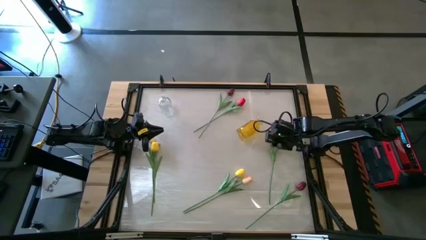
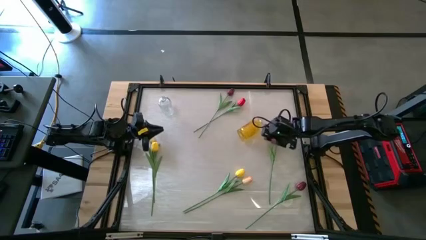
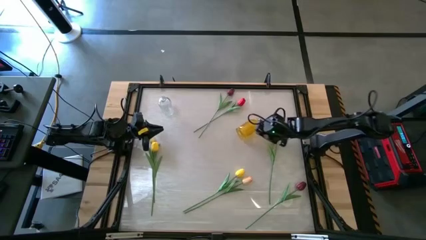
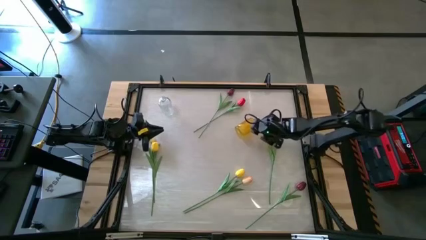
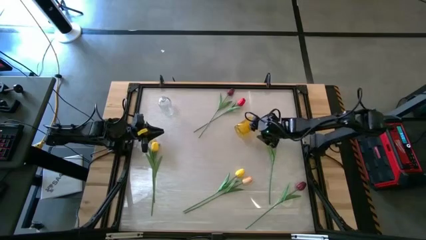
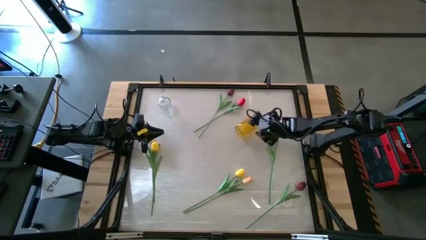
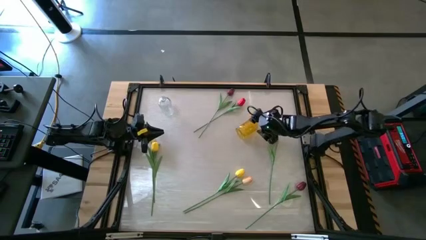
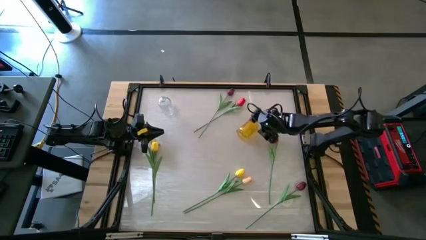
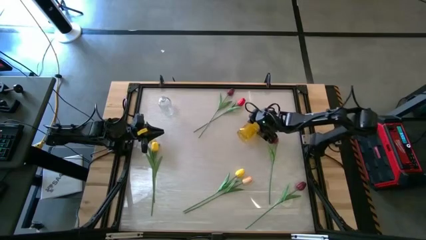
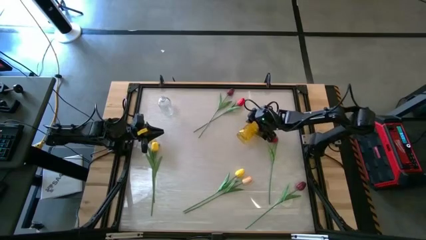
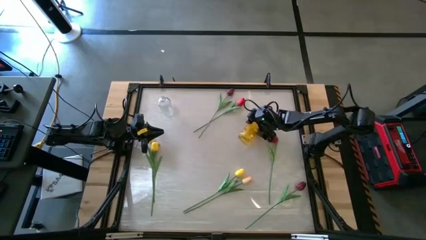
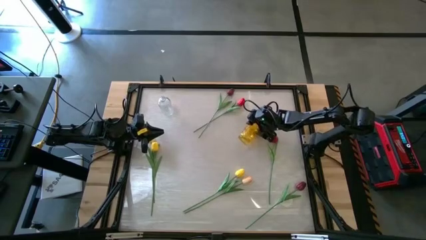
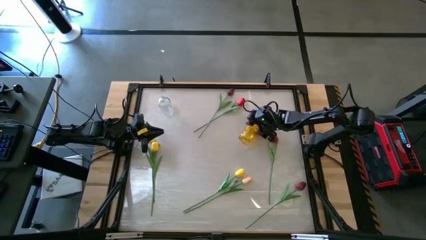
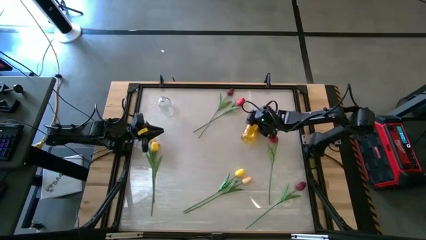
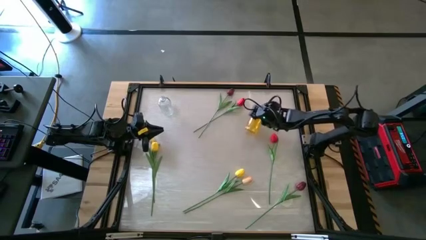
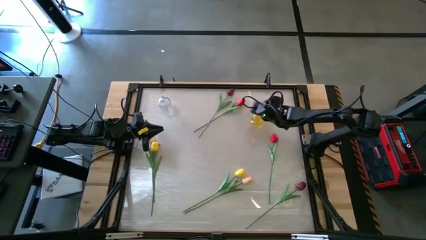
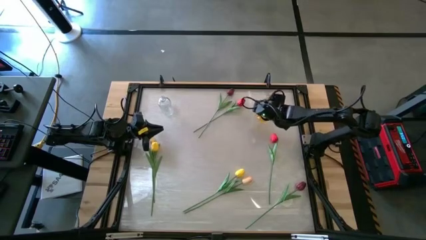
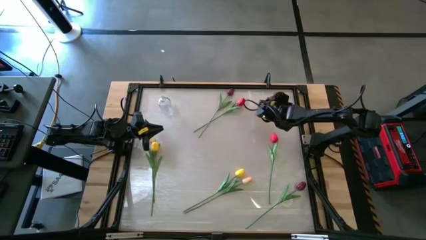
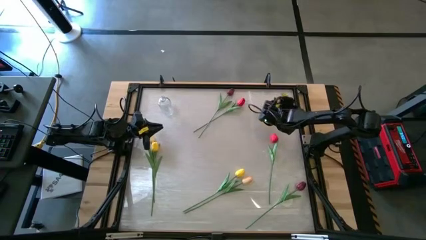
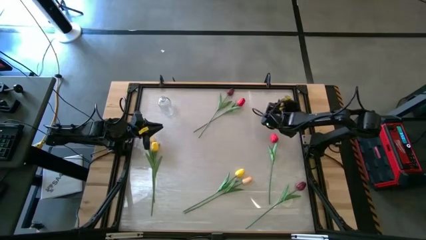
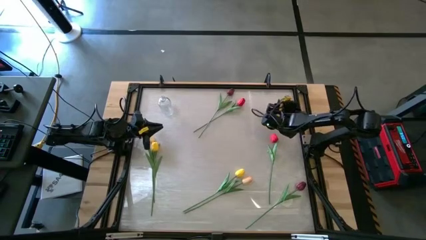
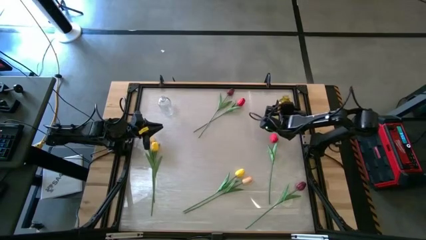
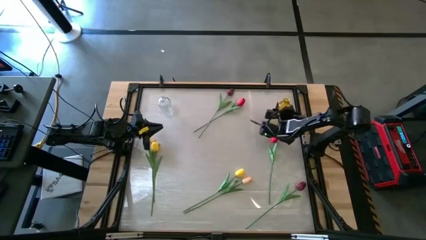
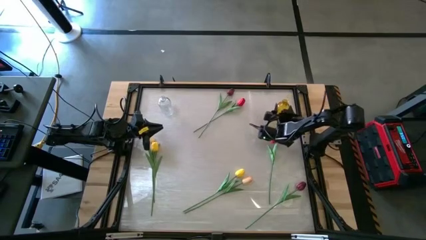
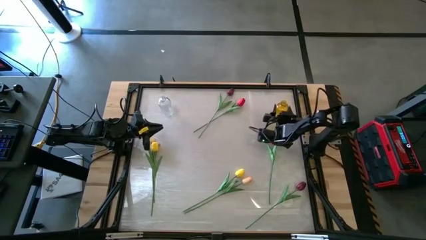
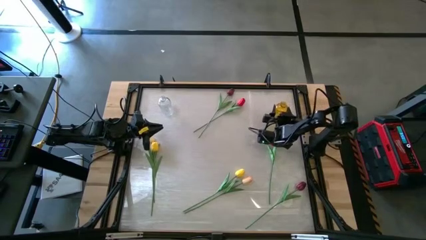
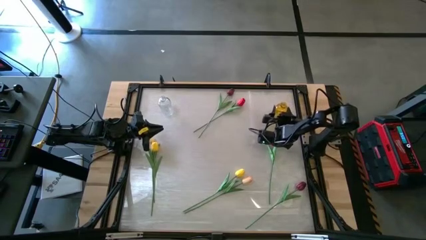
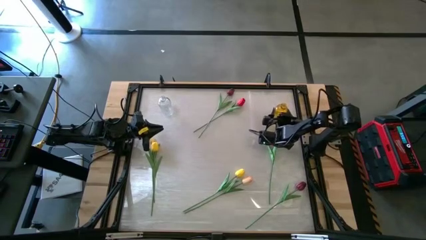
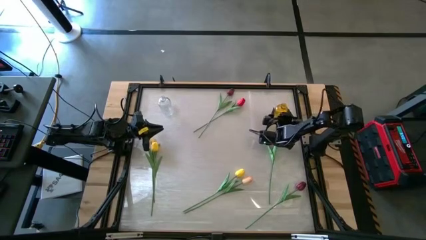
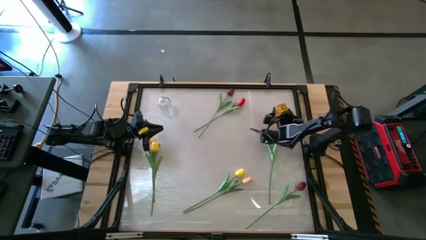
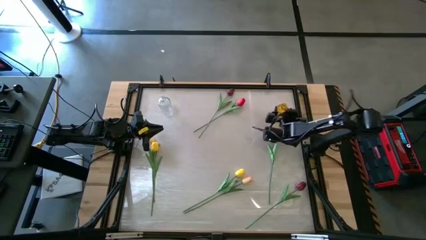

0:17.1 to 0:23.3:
Task: Sort flowers into vase by color
Adjust the yellow vase on the table

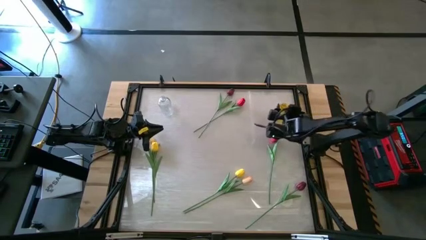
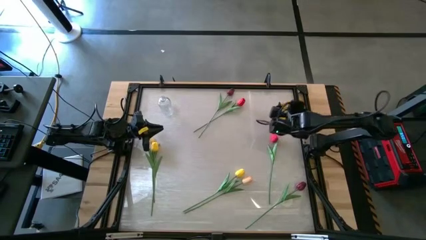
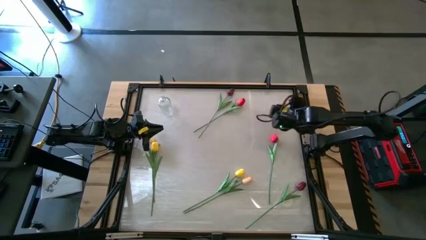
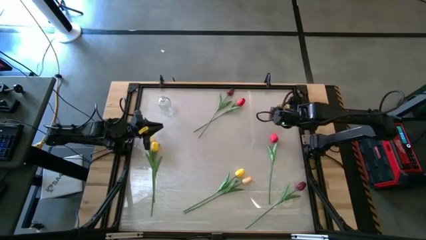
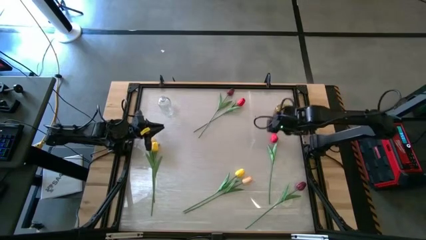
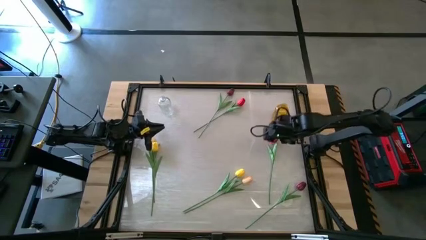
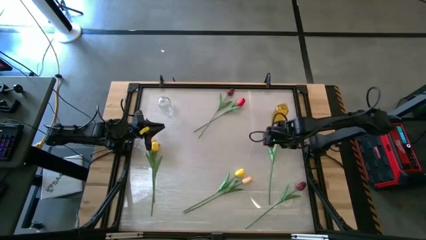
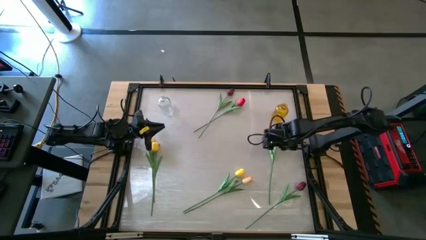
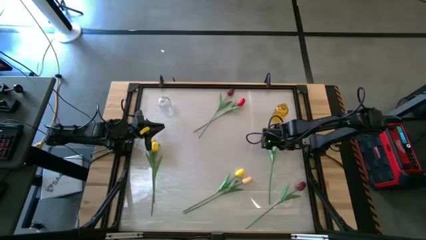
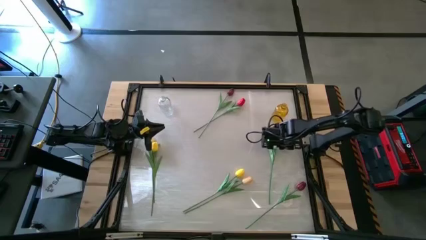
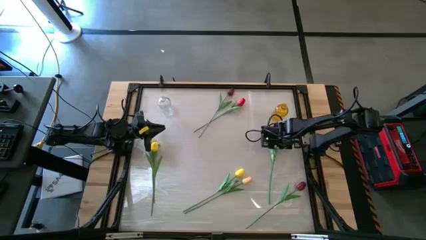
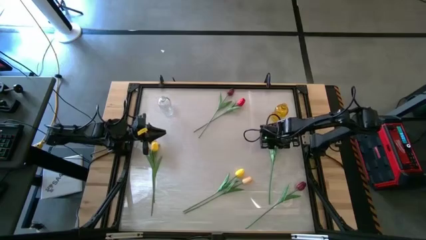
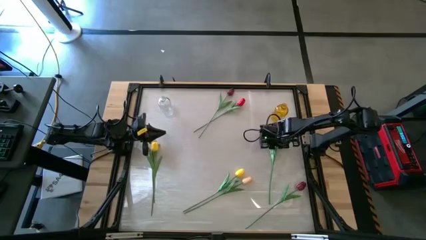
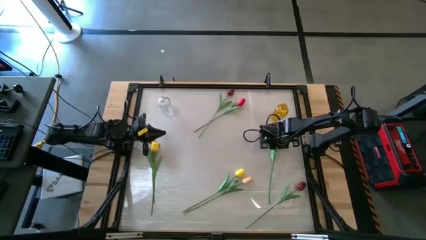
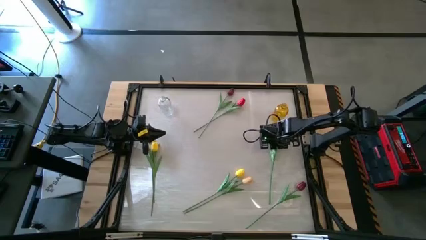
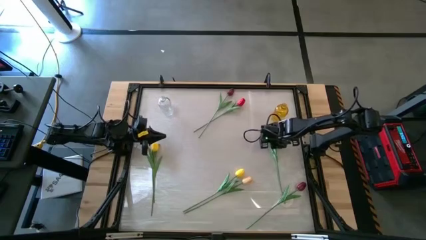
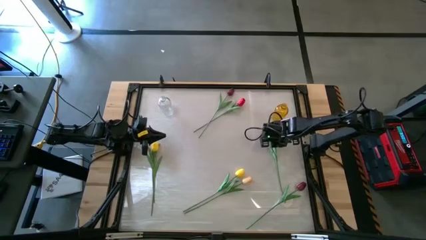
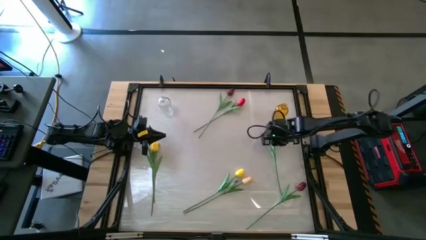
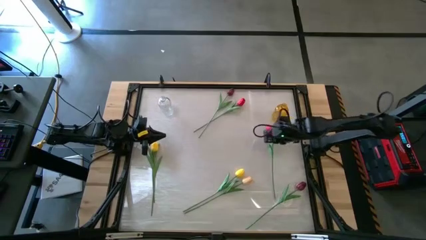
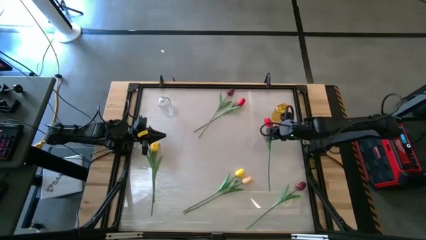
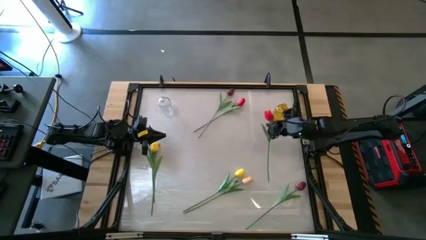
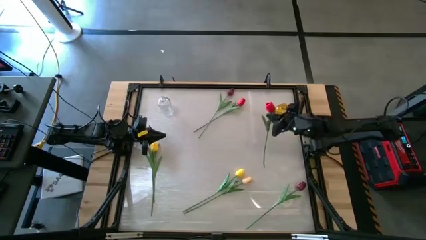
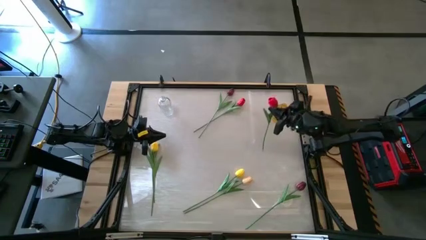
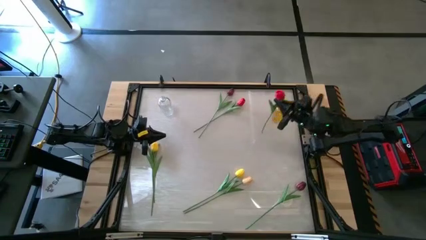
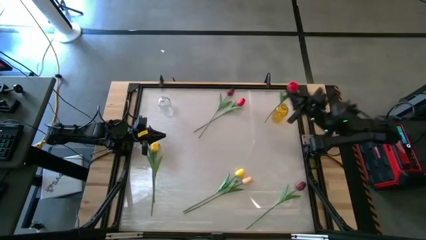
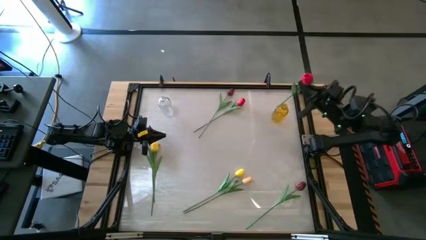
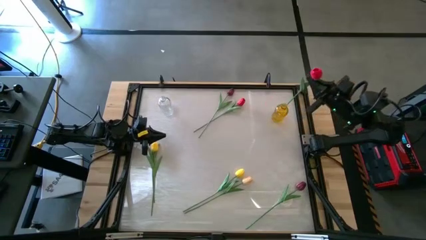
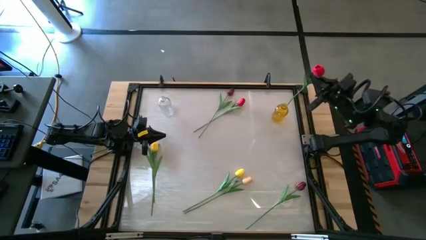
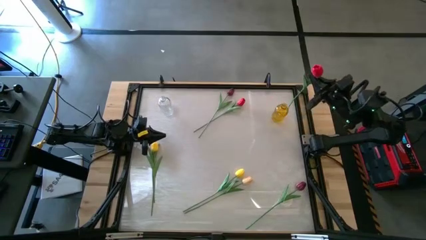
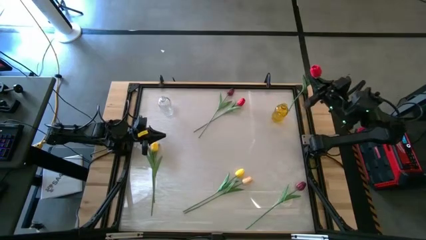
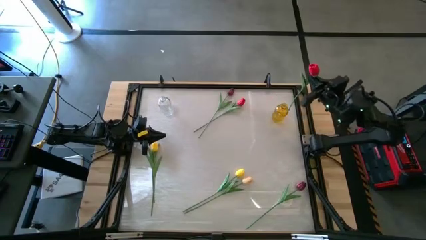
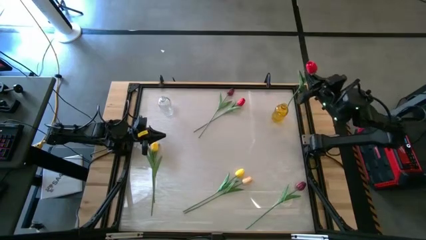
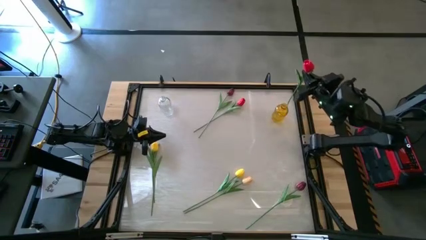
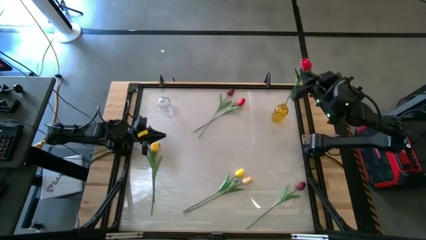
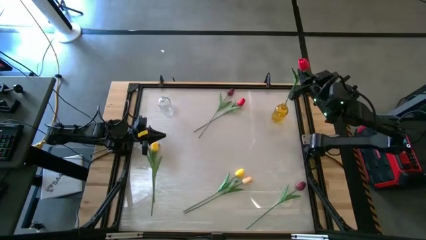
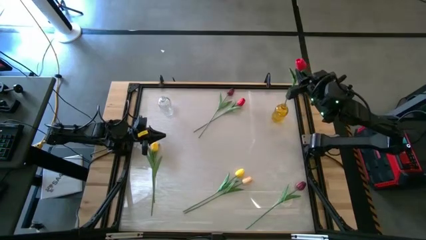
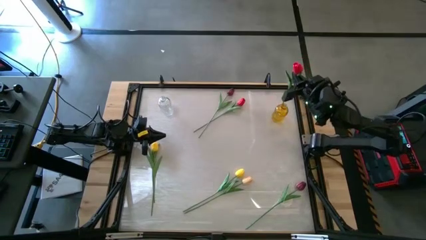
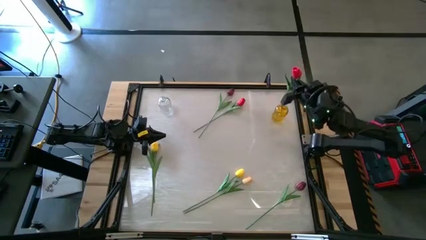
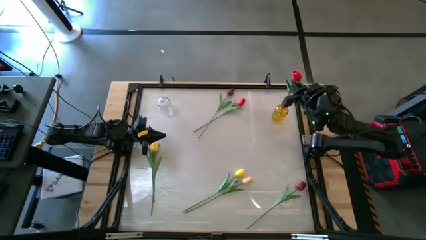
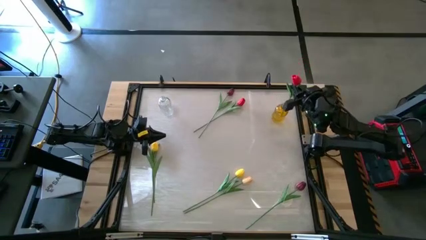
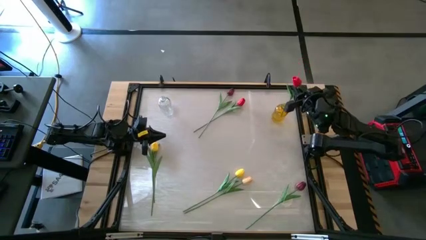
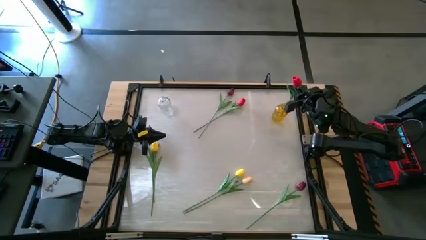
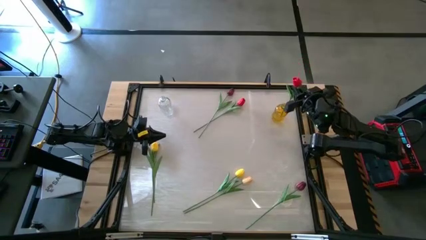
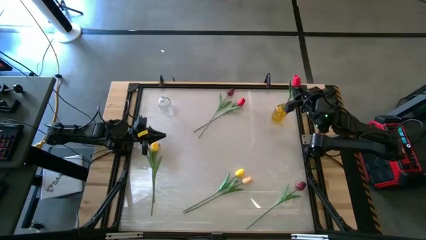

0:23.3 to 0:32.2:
Put the bottom red tulip into the yellow vase
